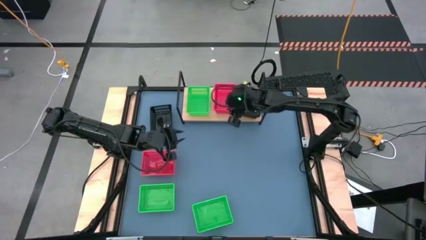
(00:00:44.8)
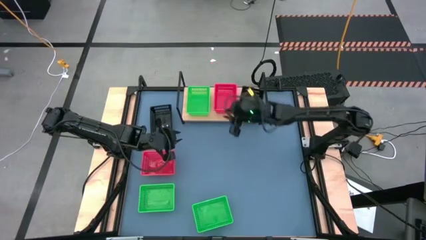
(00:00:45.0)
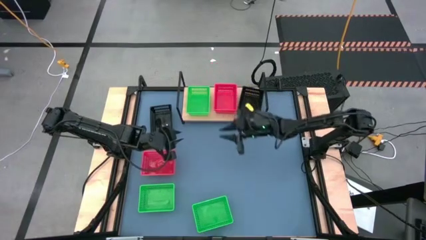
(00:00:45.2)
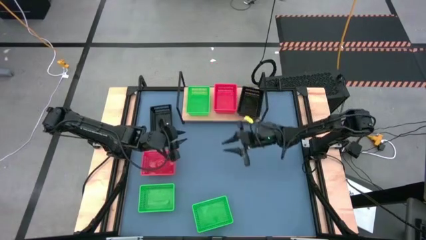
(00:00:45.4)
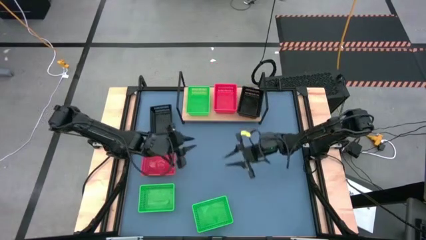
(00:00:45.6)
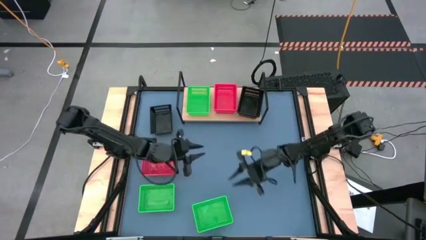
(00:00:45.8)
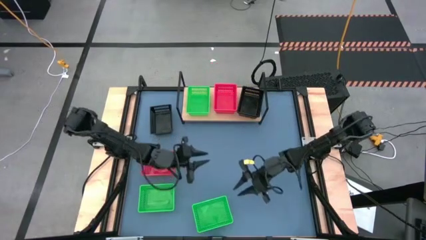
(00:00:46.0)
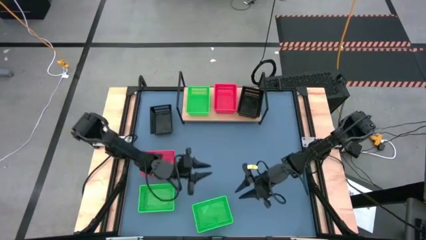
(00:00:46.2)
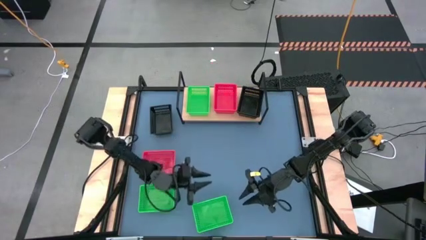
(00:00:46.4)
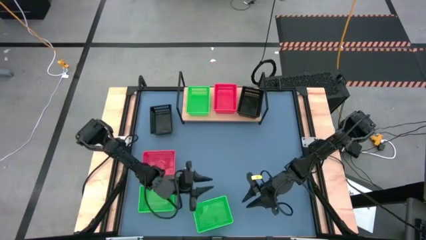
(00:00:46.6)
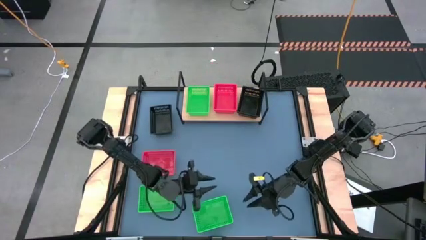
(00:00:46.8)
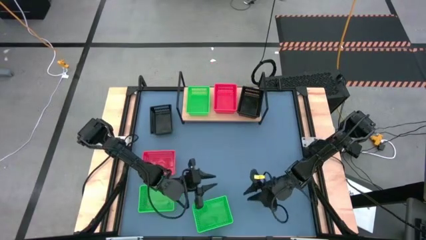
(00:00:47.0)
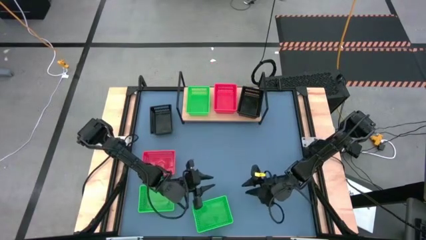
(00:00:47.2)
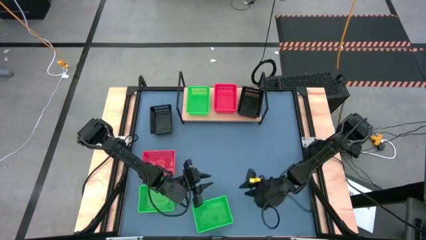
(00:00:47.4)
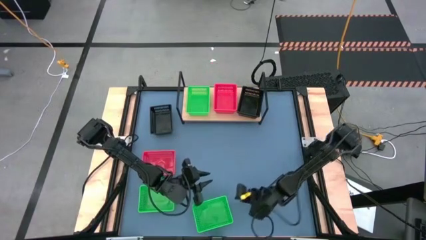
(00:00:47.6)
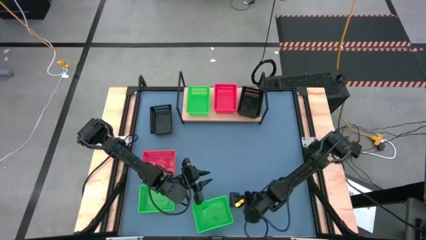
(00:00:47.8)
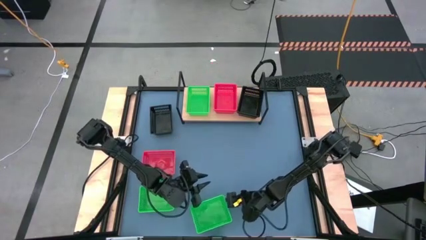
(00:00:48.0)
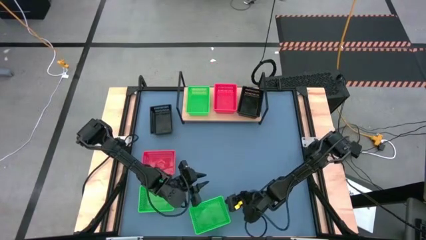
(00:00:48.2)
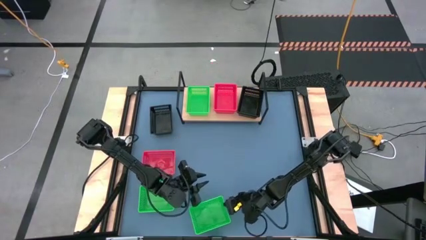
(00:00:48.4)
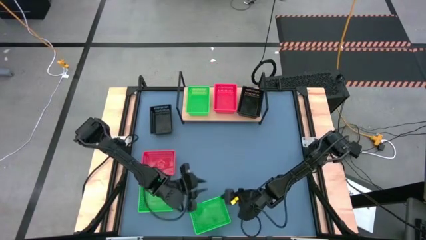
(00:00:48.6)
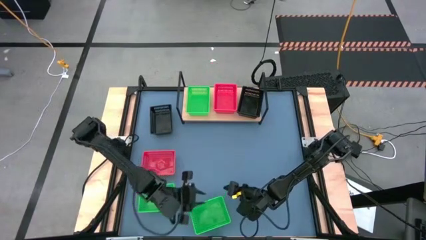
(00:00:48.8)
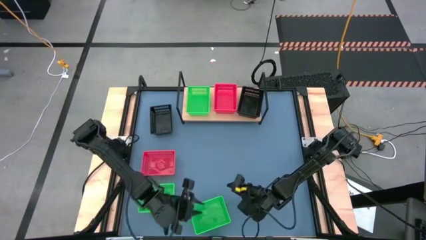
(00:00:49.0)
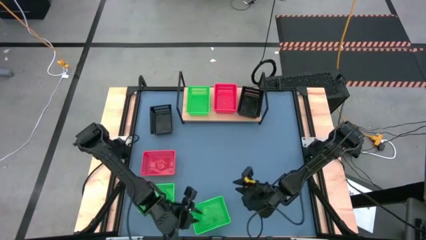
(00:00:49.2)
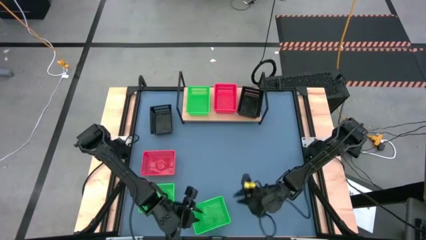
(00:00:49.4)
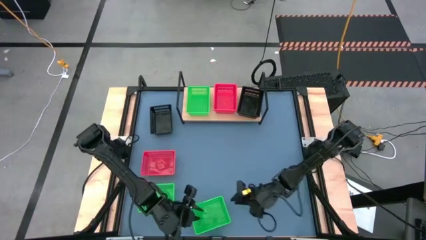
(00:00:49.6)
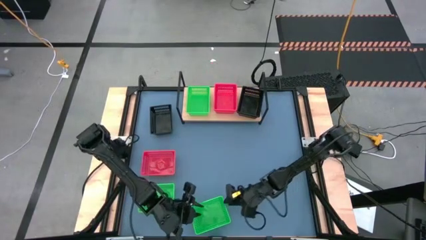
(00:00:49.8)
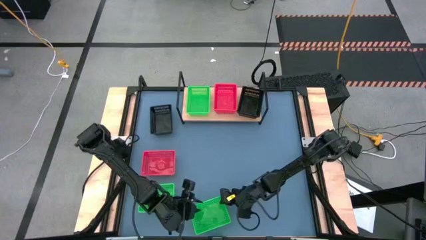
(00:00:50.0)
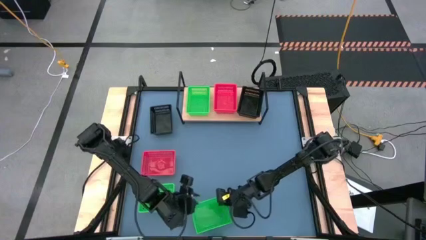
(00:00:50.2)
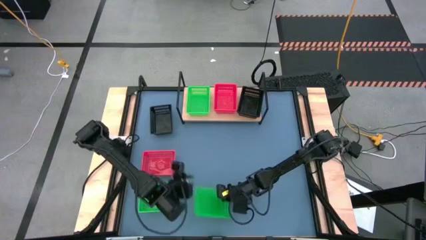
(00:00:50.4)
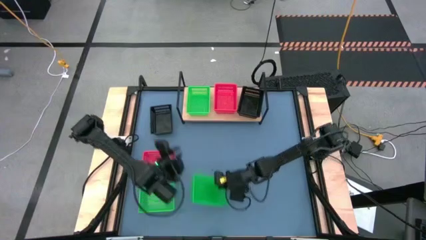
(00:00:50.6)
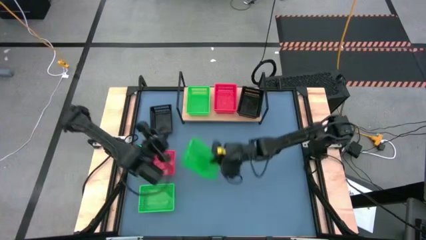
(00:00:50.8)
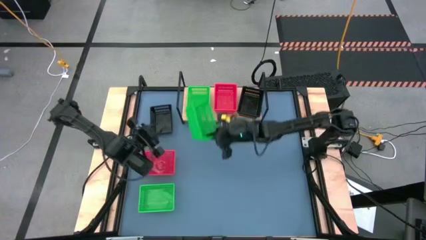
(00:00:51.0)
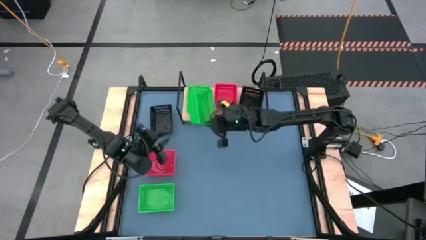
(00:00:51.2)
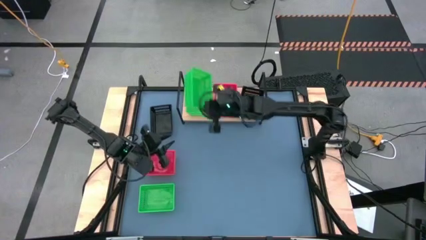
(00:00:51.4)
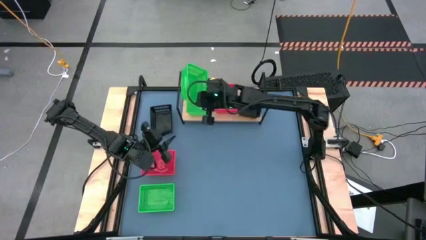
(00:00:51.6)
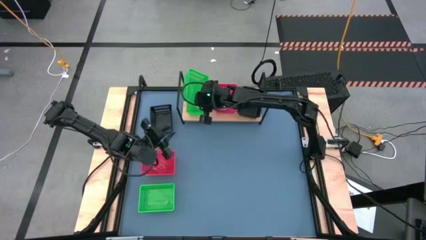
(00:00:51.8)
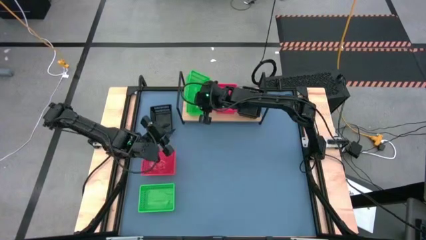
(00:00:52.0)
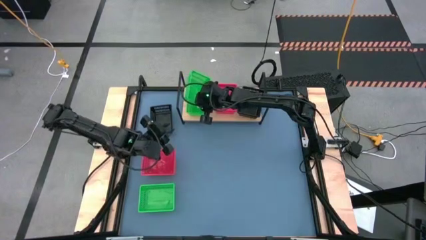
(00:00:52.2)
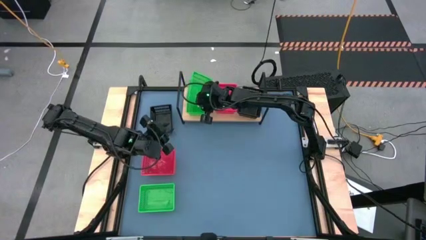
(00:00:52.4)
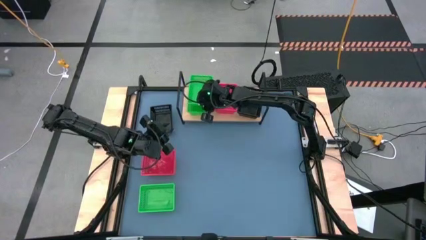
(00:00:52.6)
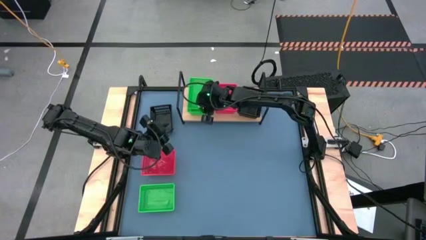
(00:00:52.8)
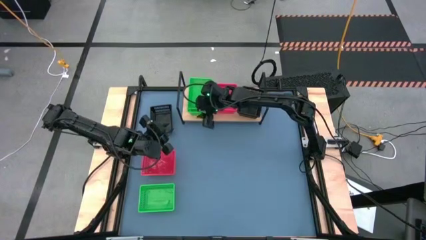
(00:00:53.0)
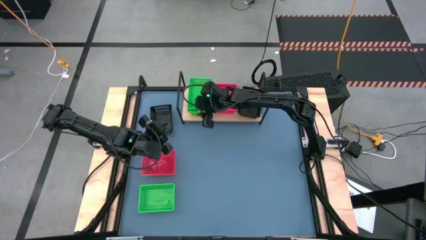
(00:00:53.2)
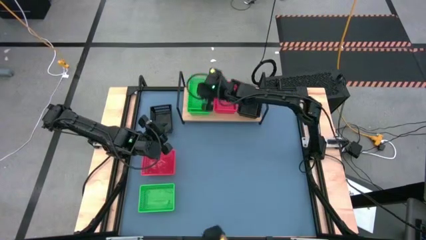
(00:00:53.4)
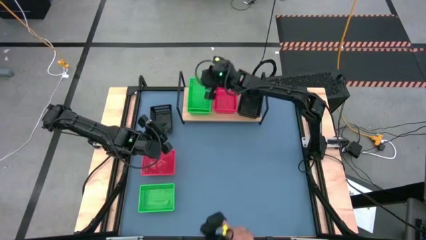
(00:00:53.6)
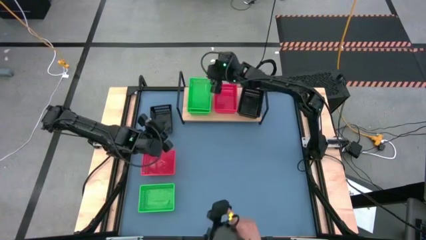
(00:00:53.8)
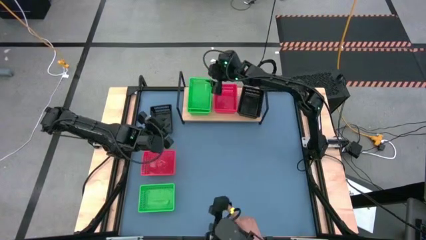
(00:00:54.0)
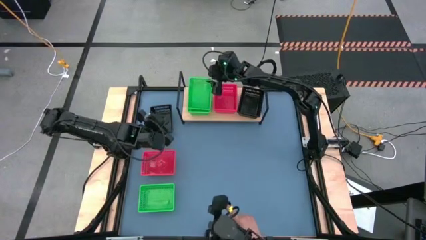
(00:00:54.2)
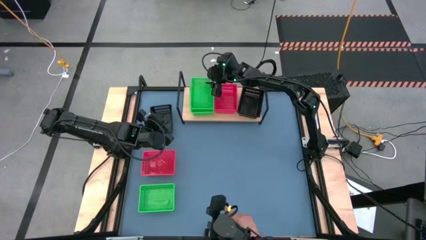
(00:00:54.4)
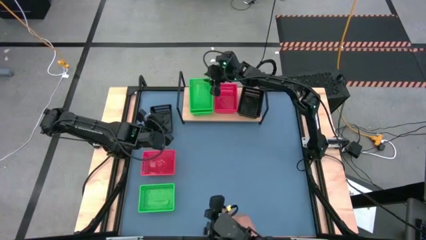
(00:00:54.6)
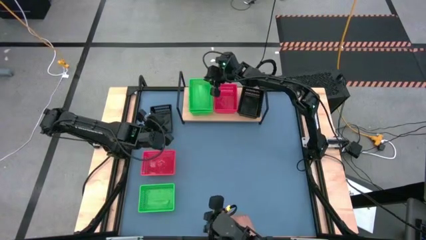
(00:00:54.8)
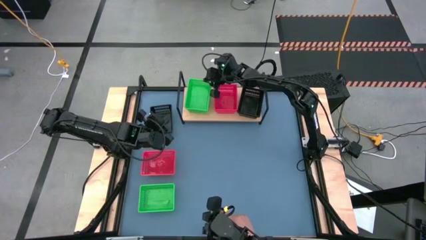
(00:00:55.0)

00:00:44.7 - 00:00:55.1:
Task: Stack baskets on shelf by color
Stack the right green bin on the green bin on the shelf

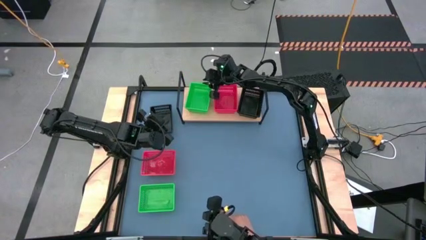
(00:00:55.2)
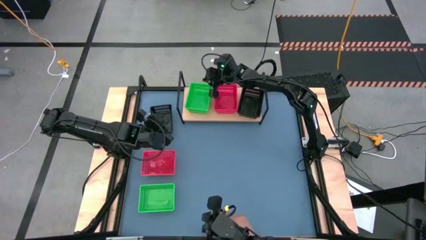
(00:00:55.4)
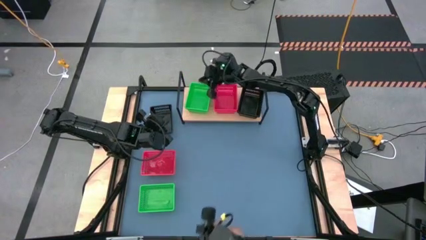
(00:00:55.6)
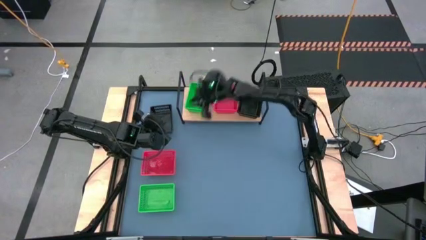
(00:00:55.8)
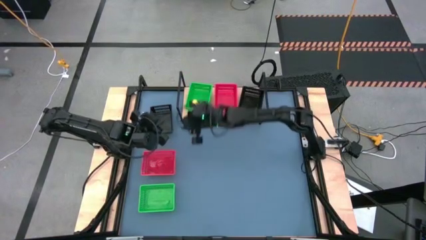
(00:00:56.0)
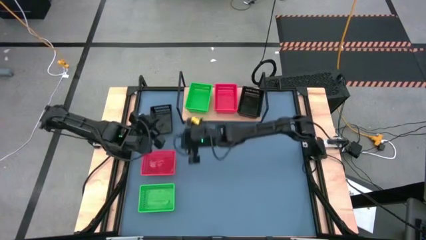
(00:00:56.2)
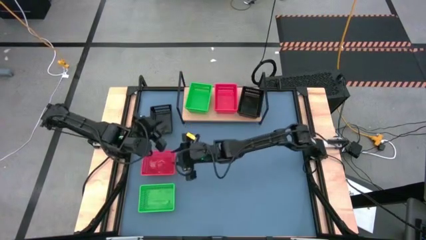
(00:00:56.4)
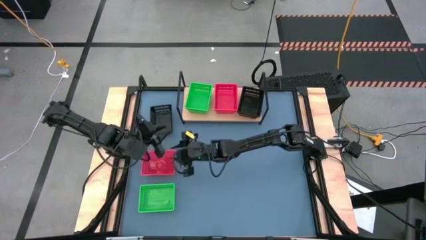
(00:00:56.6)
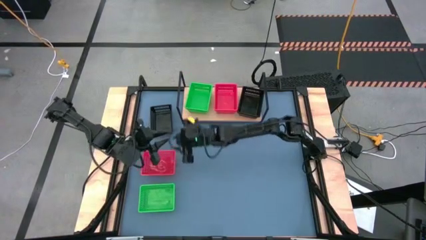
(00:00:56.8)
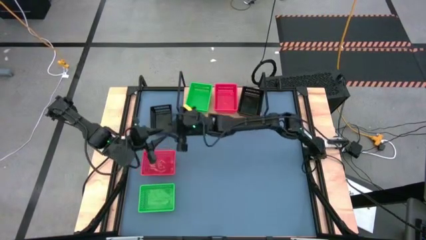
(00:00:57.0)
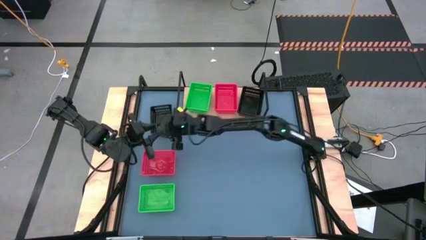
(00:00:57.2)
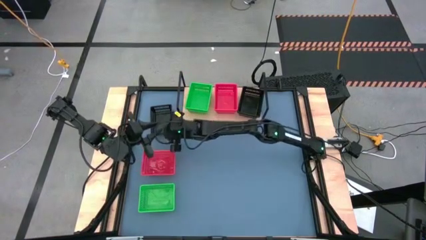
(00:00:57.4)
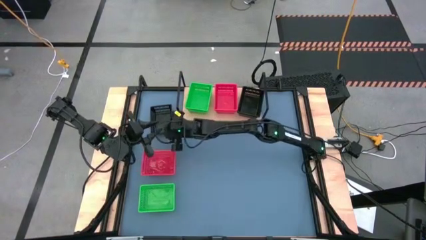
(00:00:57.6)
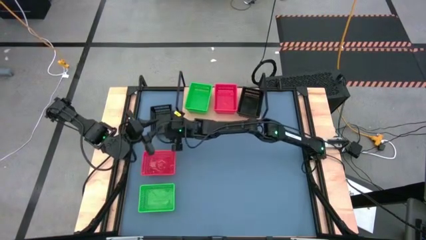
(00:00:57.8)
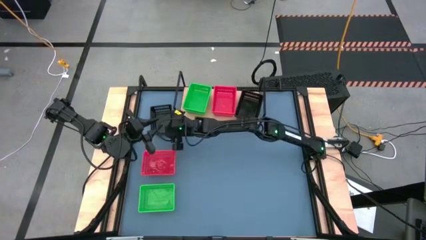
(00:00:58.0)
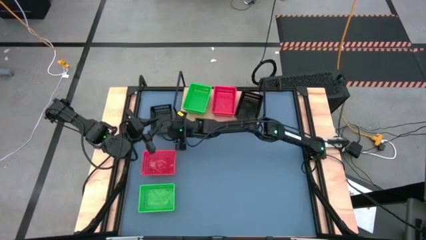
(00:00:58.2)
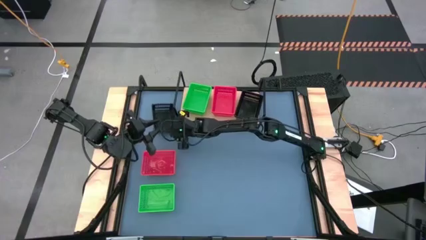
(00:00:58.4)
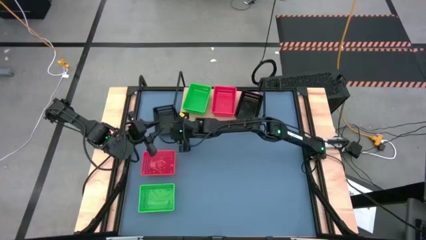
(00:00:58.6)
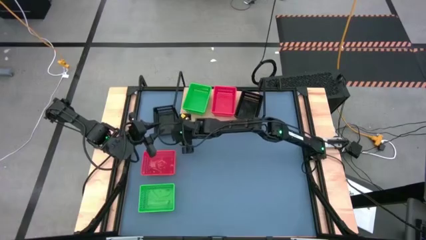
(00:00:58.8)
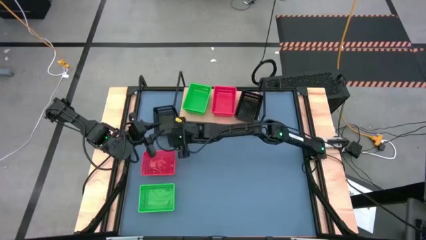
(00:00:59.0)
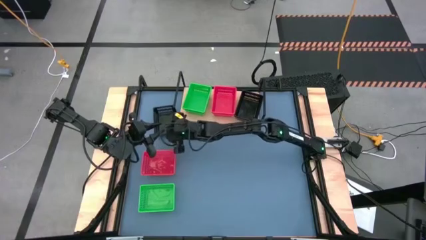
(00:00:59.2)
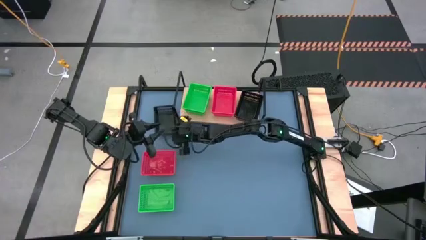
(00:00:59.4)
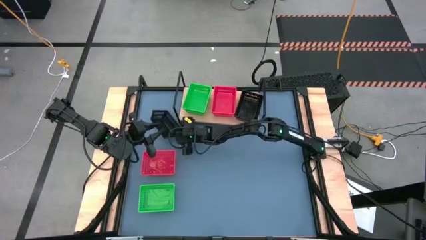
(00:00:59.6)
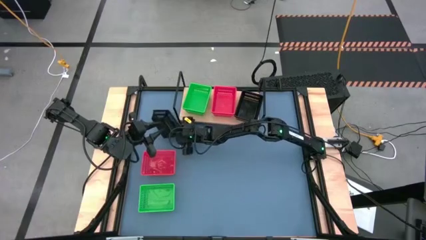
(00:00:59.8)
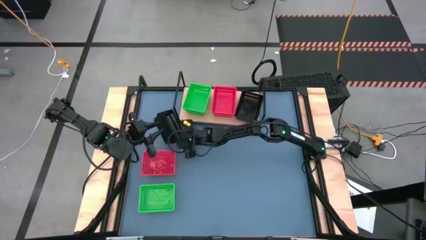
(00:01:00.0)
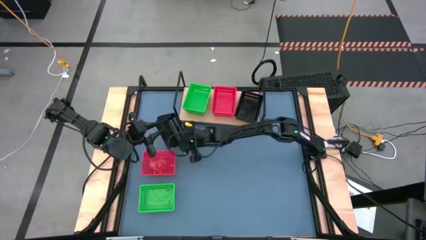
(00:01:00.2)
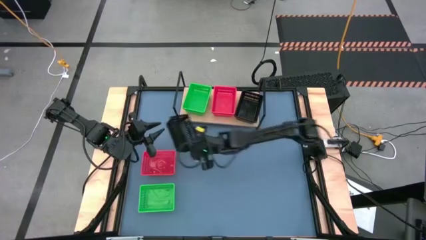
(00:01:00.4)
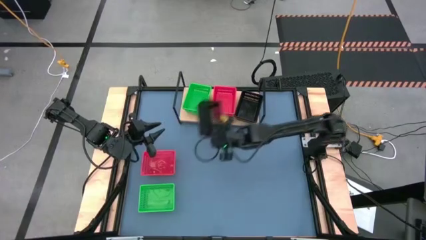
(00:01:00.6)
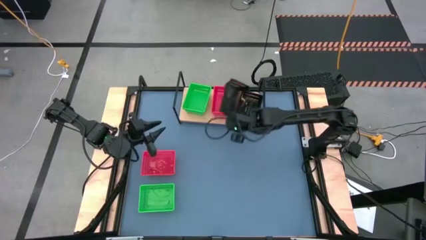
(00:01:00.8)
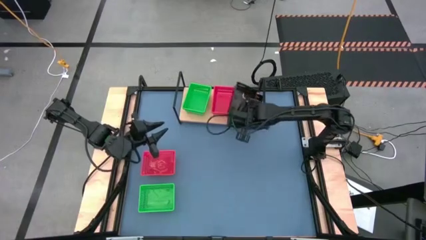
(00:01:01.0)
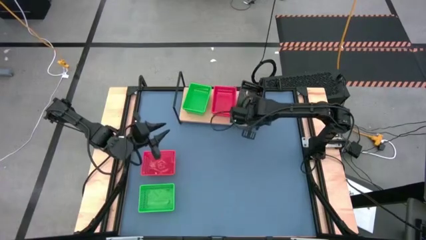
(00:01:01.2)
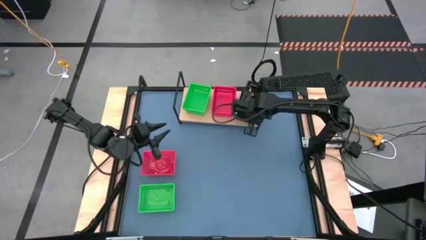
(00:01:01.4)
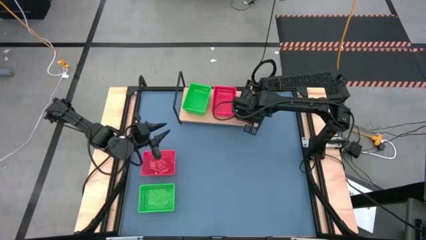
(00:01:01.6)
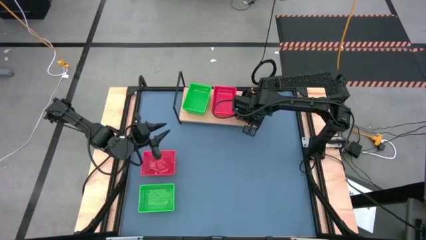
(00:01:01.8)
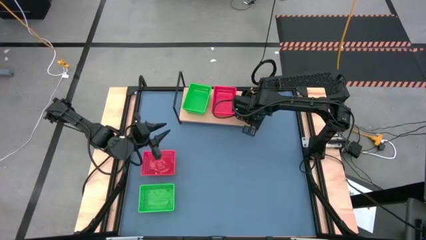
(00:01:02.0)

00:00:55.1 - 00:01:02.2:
Stack the black bin on the black bins on the shelf

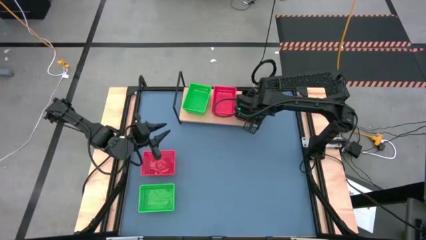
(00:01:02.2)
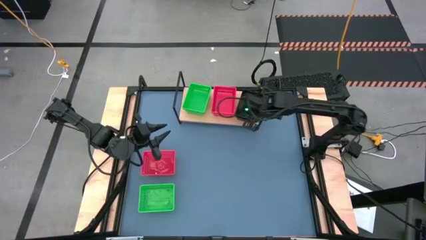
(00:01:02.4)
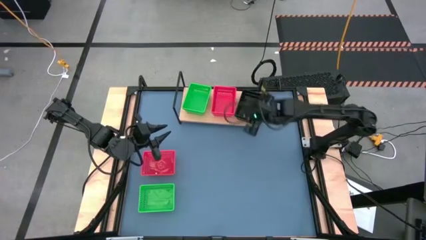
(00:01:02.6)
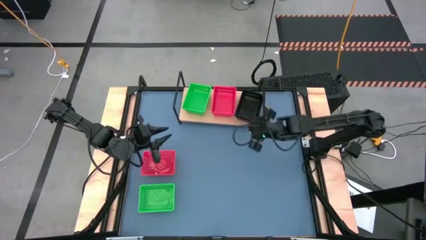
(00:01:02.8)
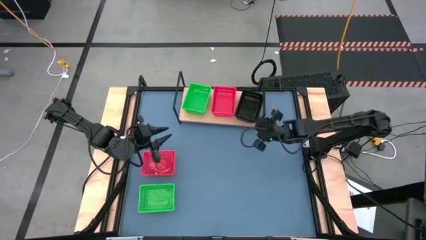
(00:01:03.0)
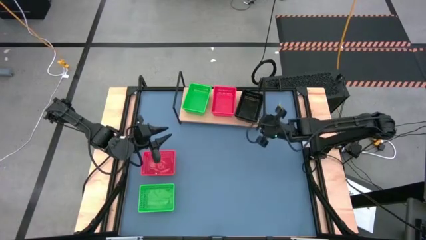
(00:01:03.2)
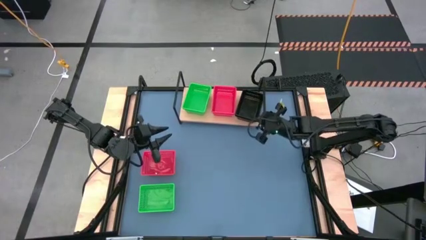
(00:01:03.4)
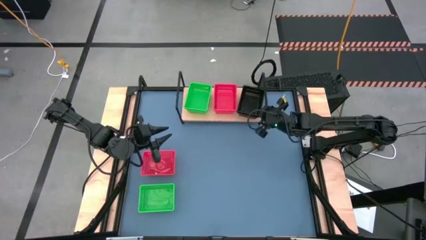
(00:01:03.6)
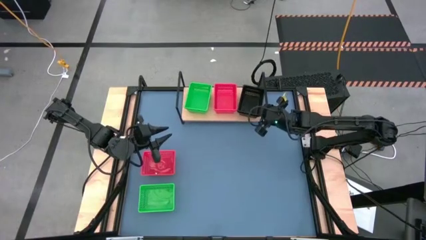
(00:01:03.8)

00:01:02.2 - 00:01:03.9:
Adjust the shelf on the table
